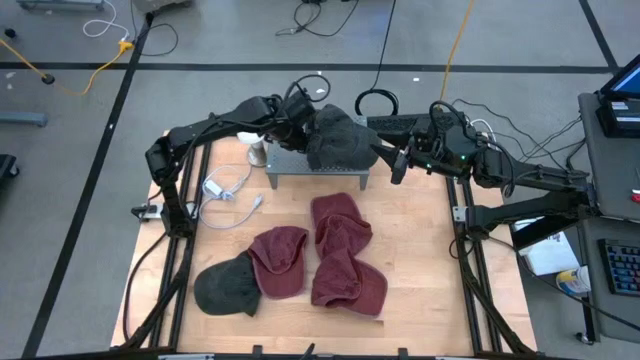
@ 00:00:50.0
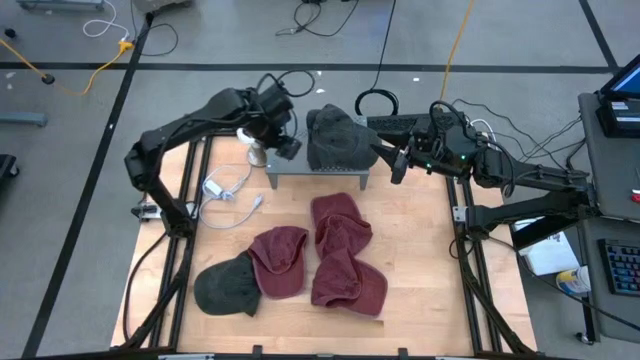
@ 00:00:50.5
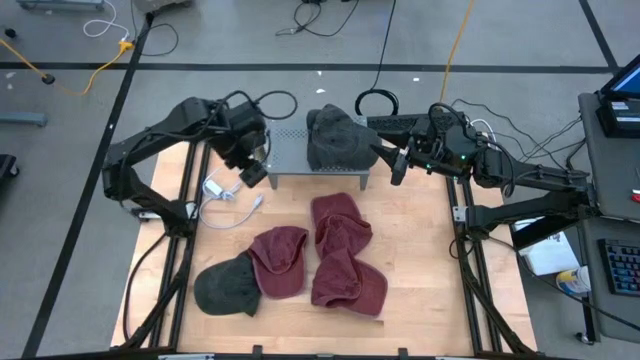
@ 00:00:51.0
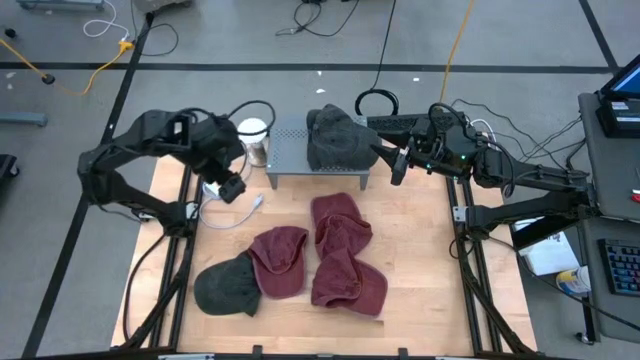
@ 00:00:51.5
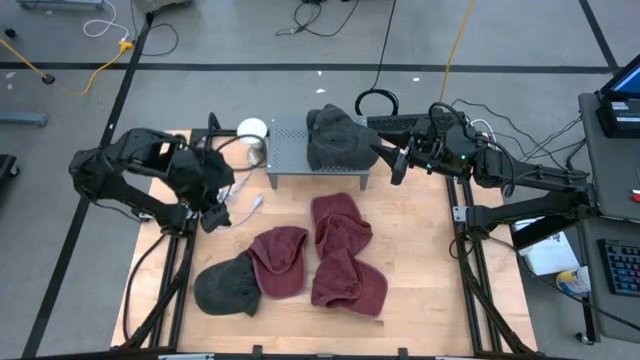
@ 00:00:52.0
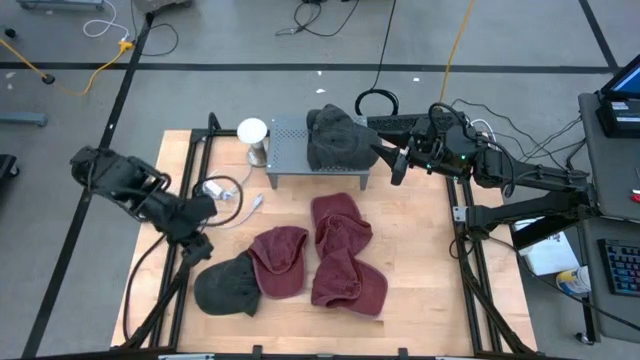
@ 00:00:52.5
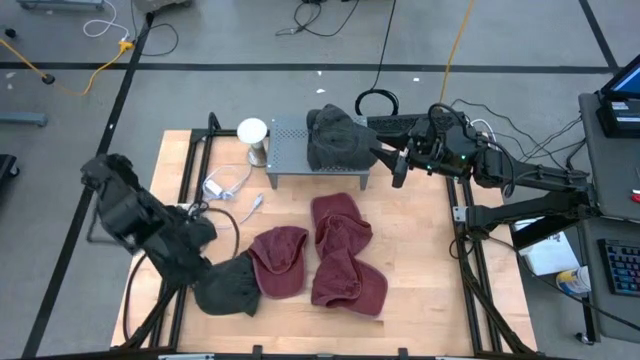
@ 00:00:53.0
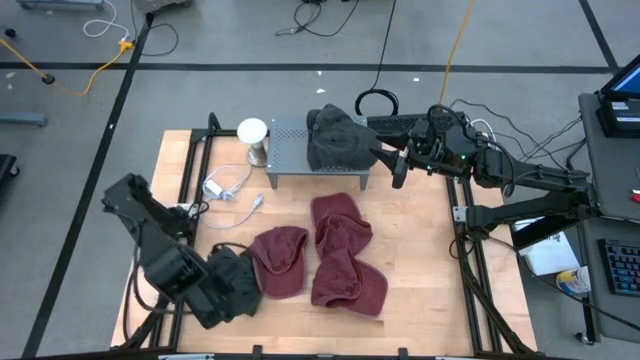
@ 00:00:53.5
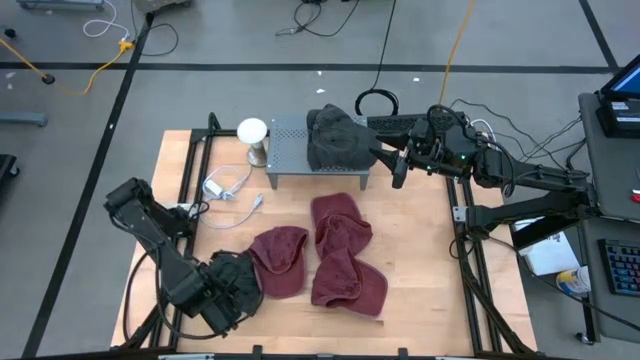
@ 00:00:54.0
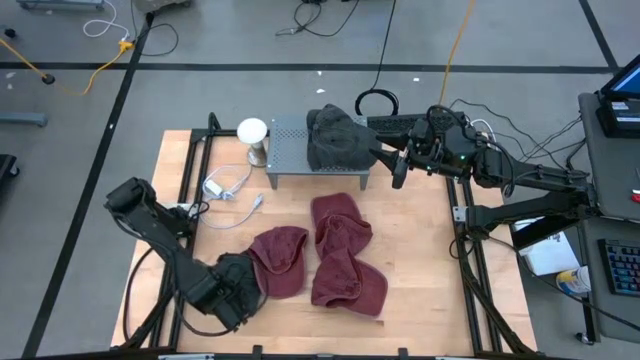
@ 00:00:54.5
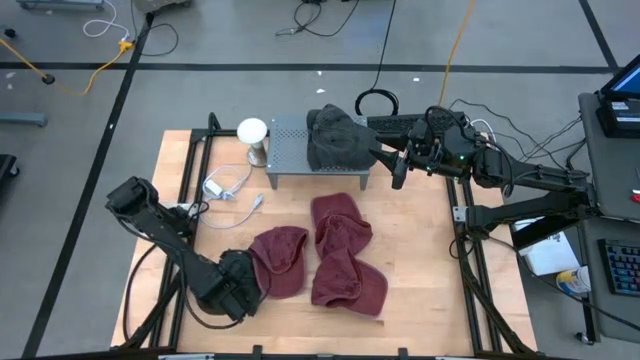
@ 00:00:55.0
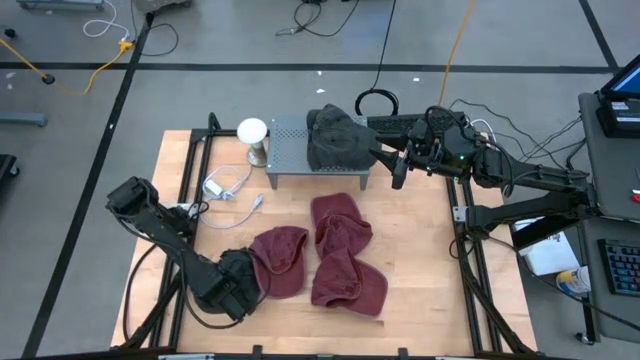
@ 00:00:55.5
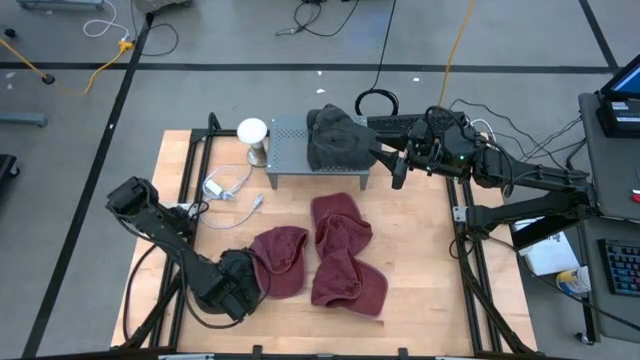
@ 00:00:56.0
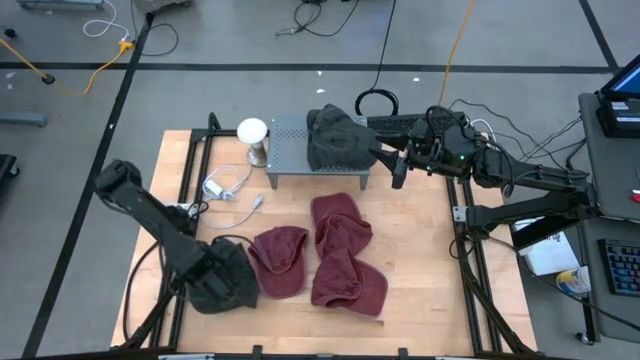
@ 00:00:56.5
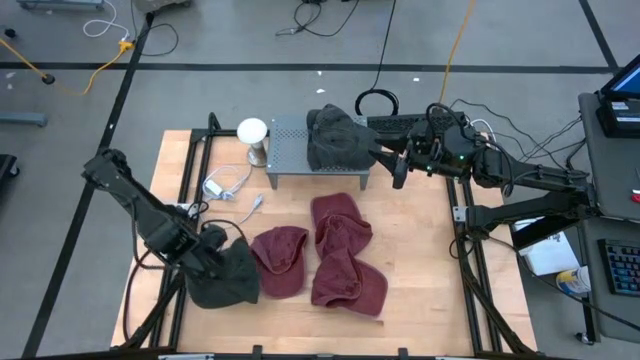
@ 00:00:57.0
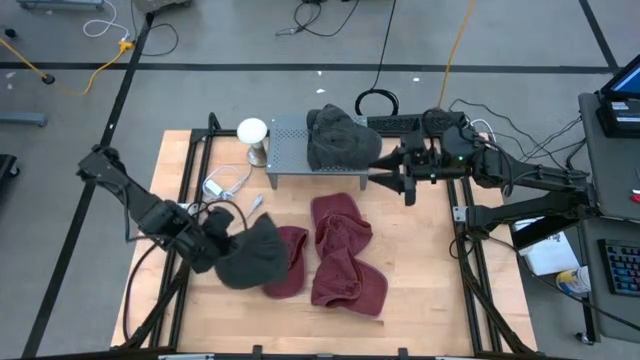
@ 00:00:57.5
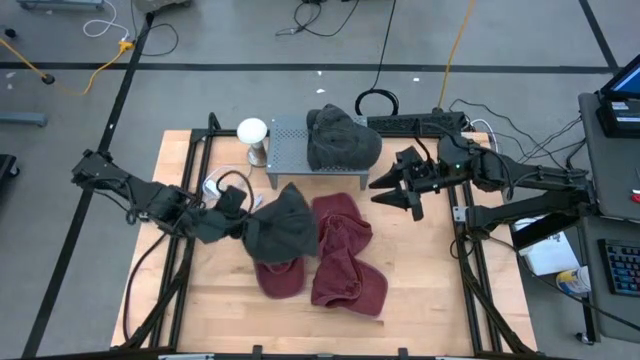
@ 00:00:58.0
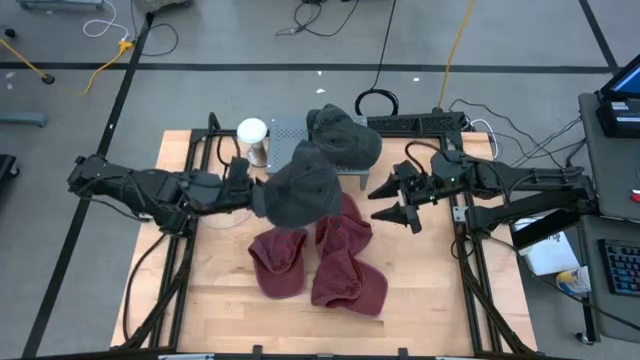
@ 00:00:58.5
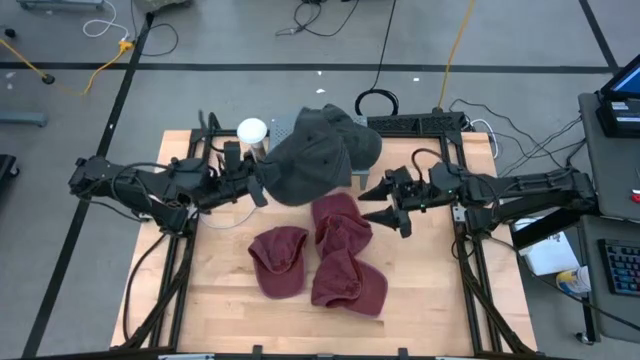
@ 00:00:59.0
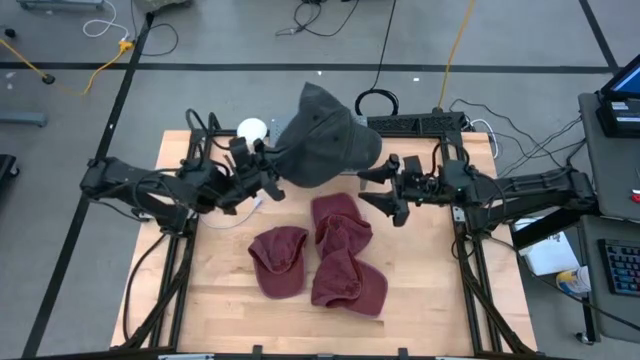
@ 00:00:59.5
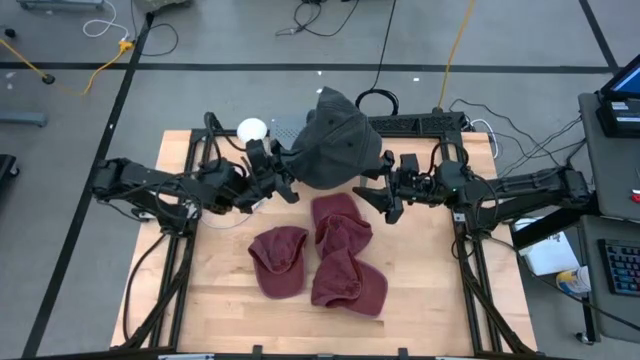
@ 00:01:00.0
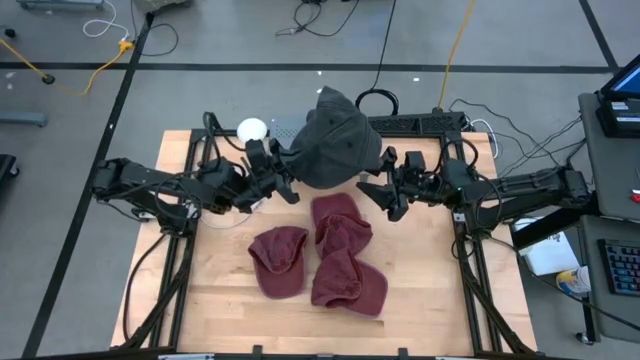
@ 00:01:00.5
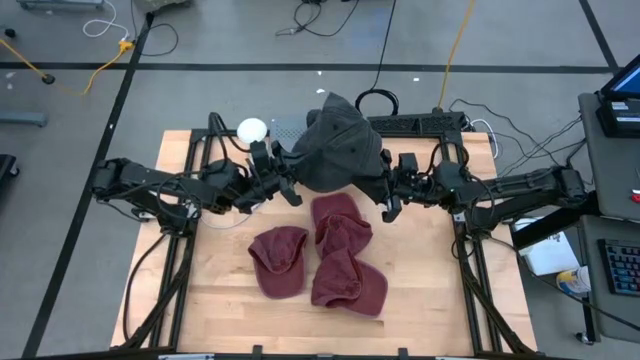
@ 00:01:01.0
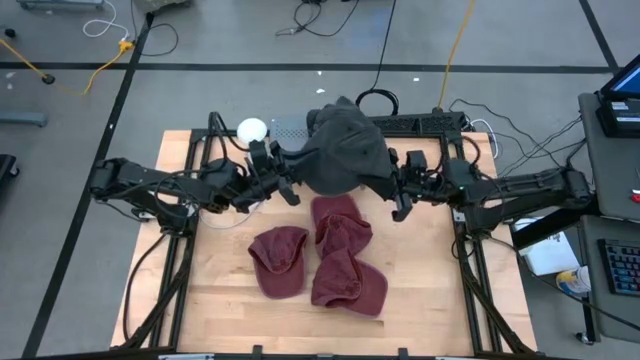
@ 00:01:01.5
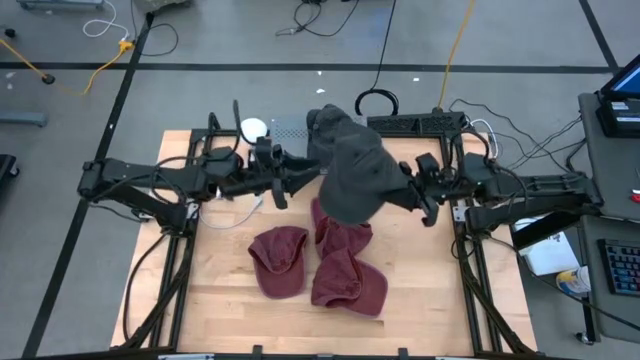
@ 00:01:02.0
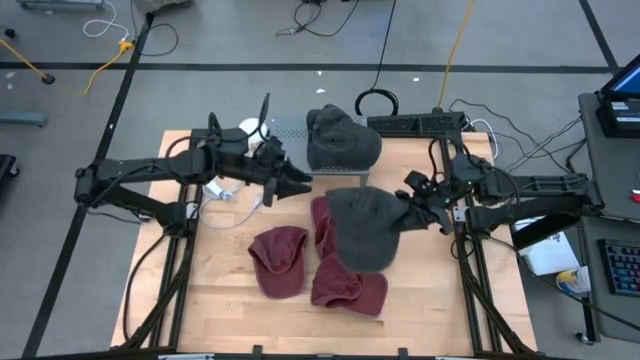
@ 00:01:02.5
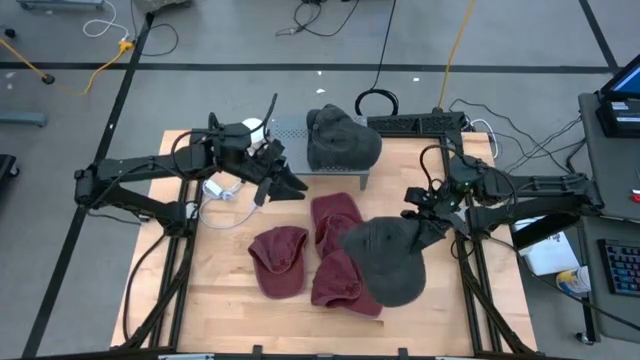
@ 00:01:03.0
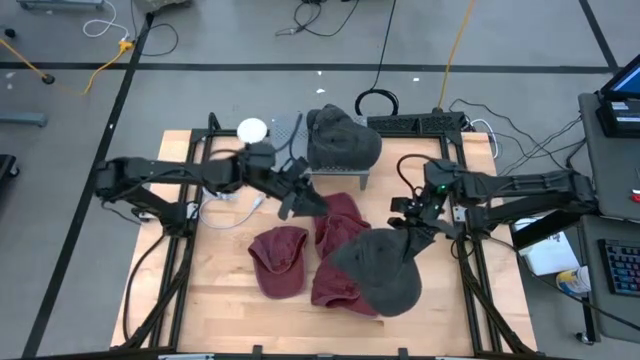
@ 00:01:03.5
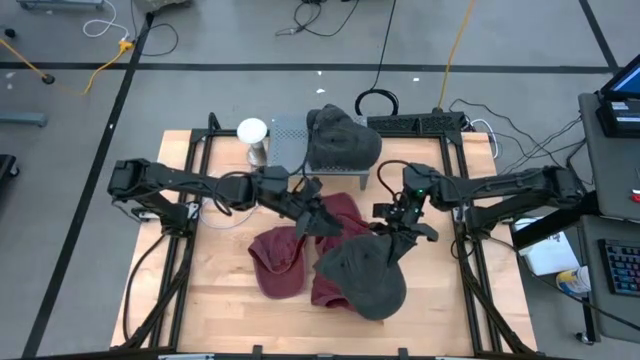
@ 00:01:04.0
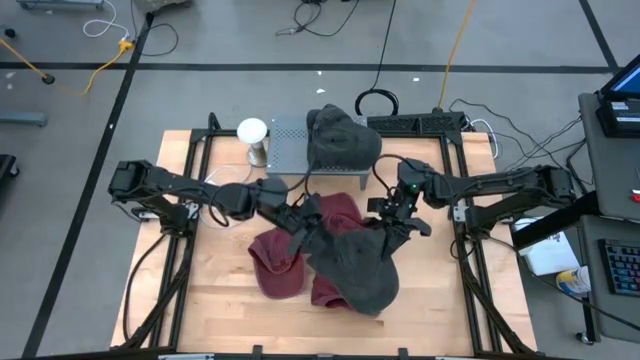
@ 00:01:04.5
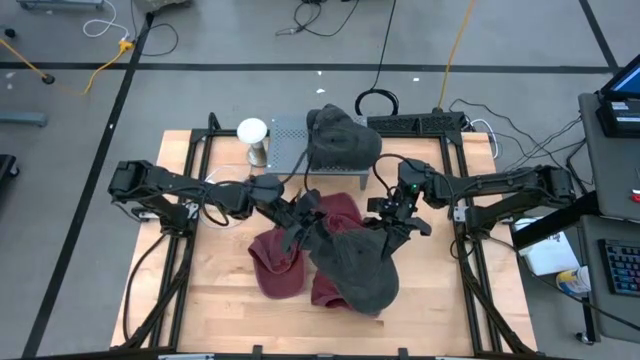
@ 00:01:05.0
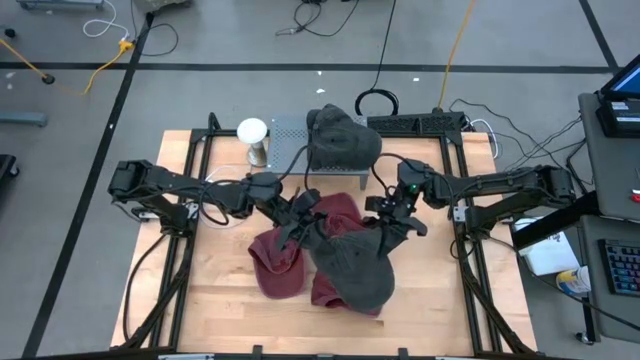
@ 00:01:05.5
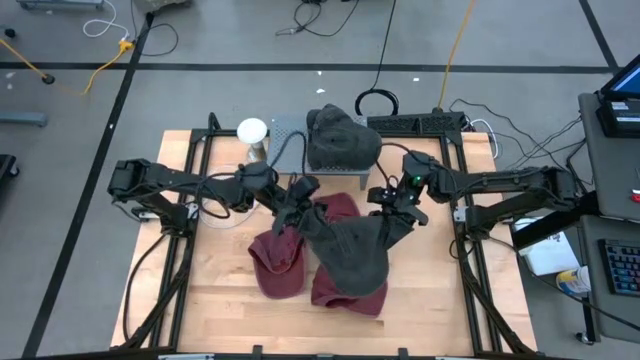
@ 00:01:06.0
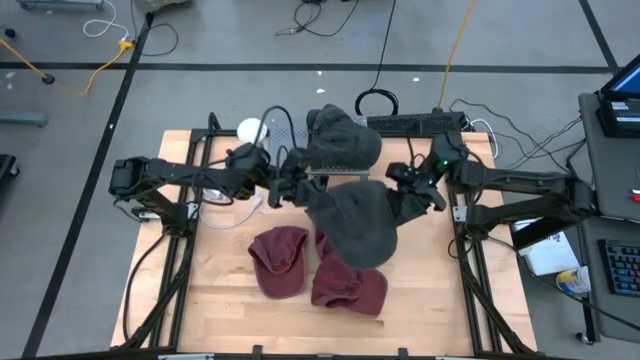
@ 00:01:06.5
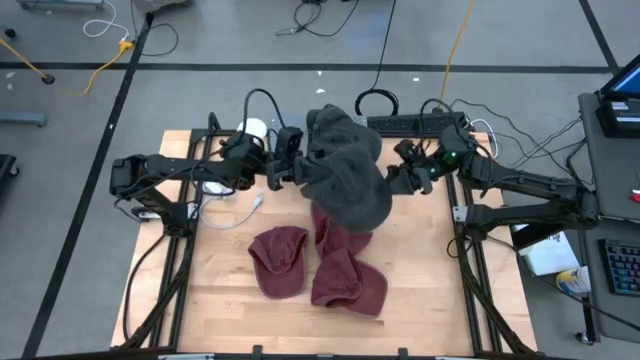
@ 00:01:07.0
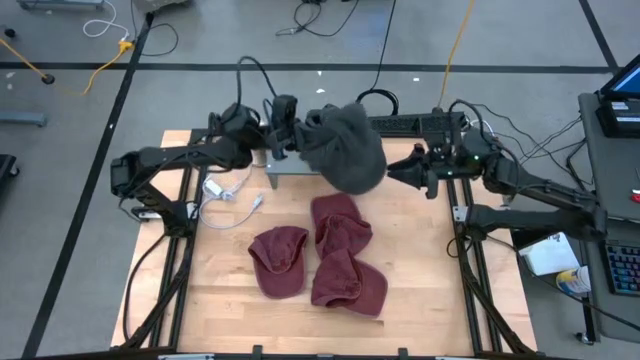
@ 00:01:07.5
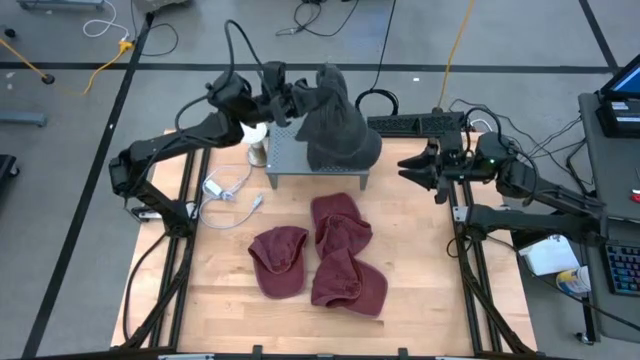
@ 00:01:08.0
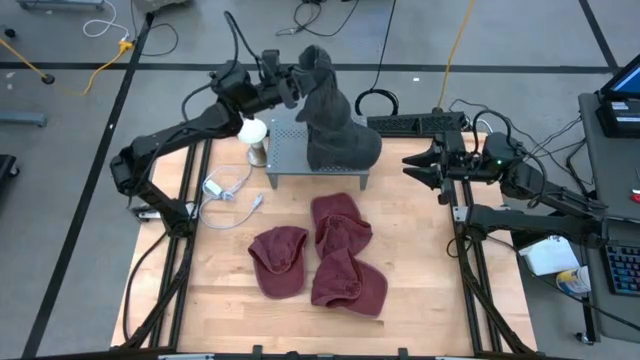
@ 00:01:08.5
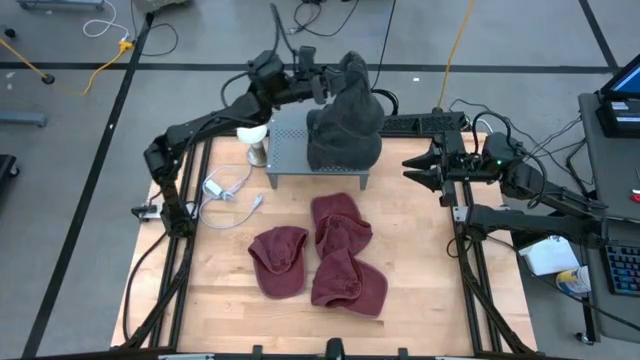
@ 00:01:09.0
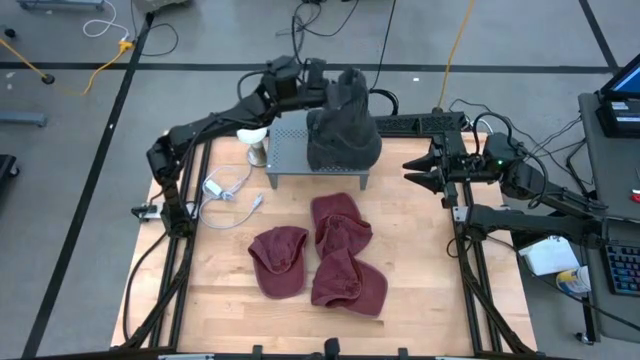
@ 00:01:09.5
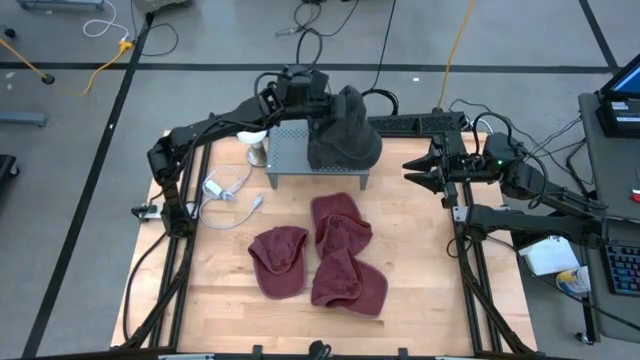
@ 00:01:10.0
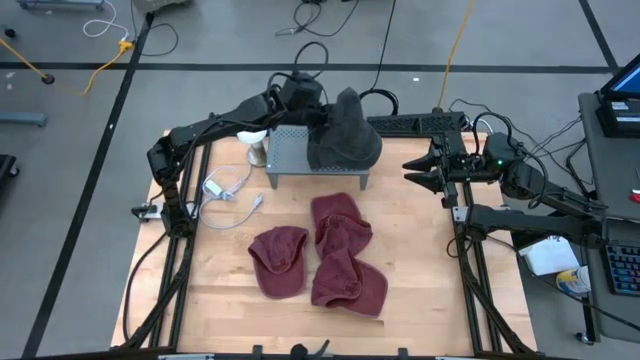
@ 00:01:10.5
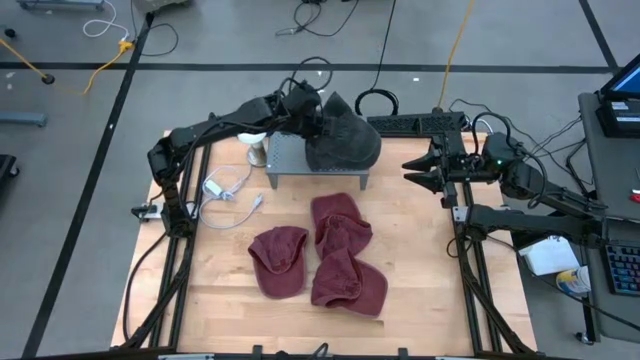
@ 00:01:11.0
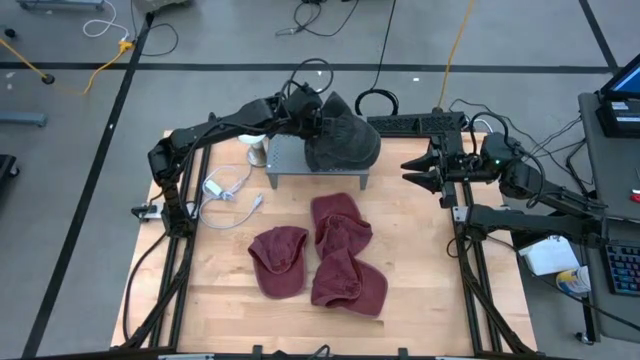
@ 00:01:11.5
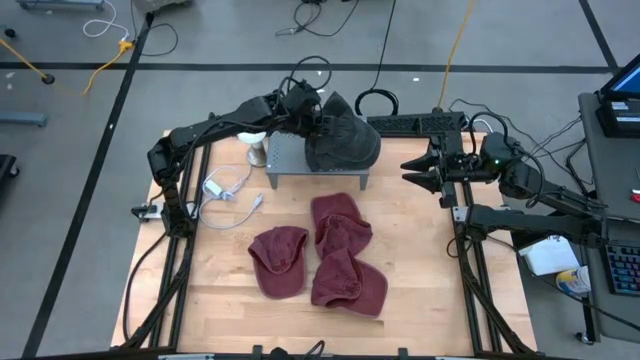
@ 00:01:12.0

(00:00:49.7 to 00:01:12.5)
Task: Pick & Place hat
Stack the black cap on top of the black cap on the shelf
